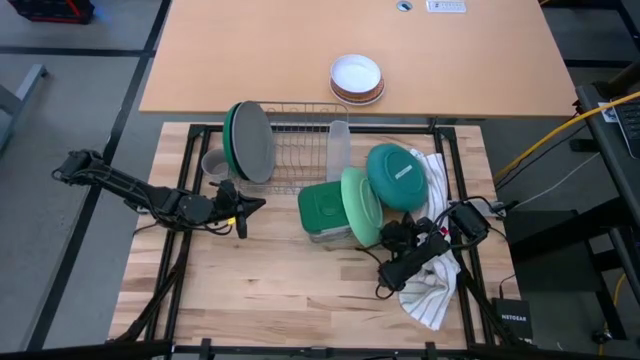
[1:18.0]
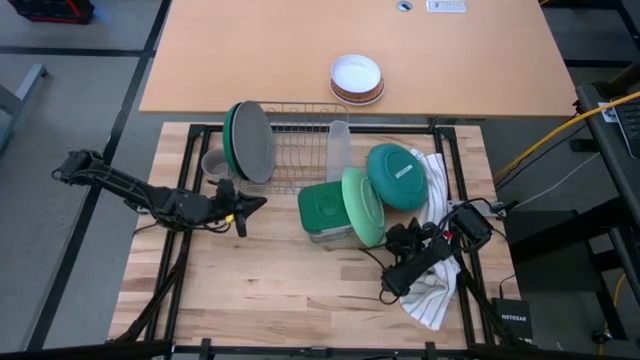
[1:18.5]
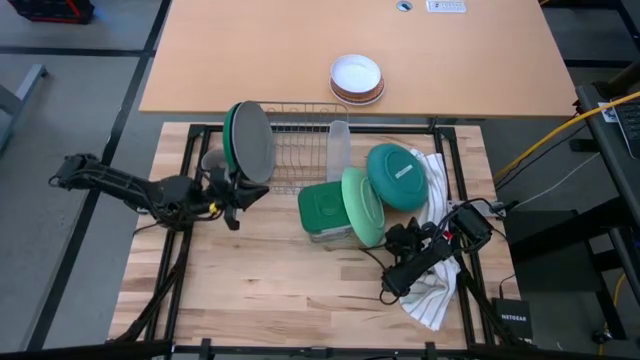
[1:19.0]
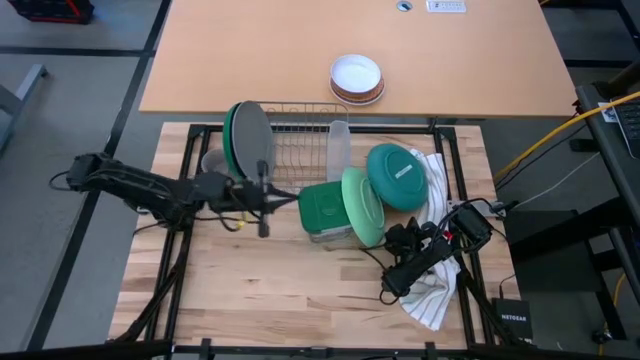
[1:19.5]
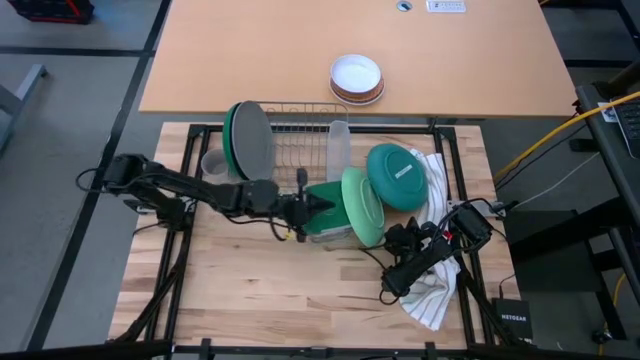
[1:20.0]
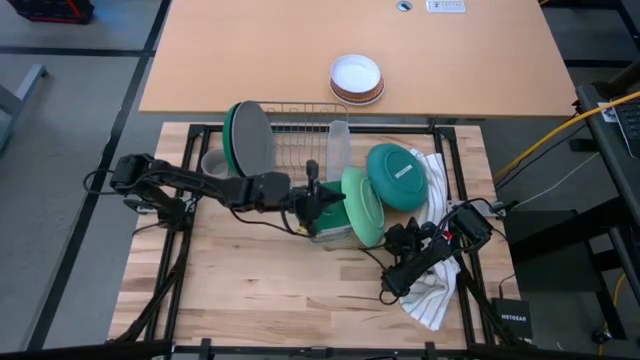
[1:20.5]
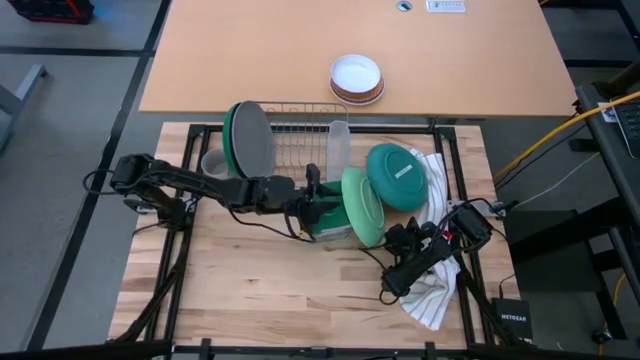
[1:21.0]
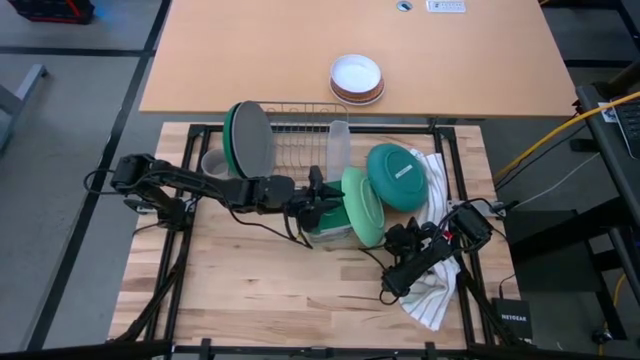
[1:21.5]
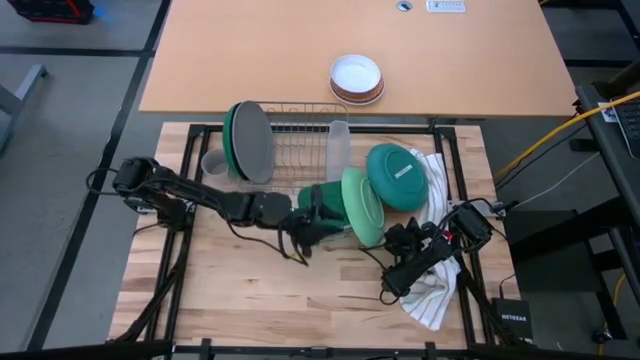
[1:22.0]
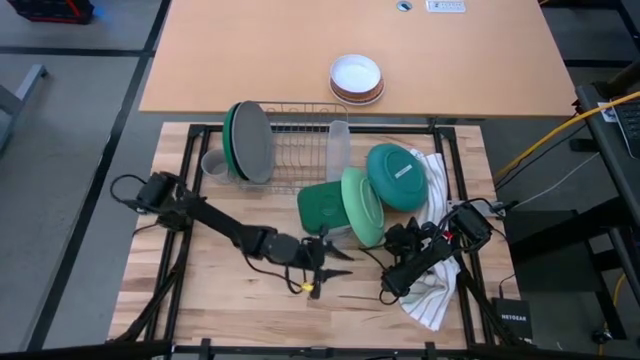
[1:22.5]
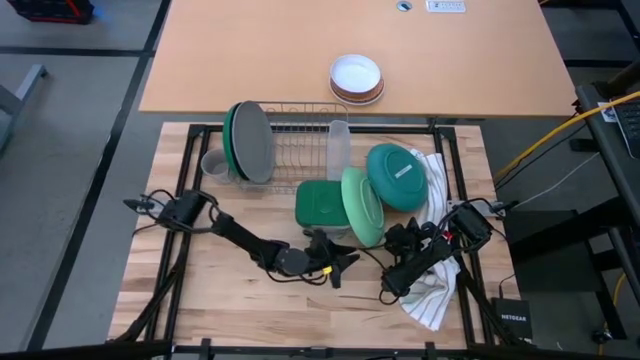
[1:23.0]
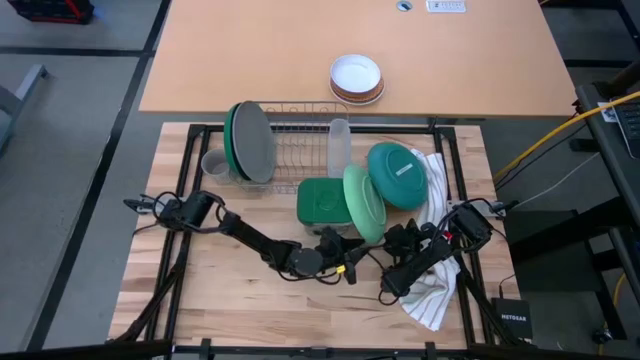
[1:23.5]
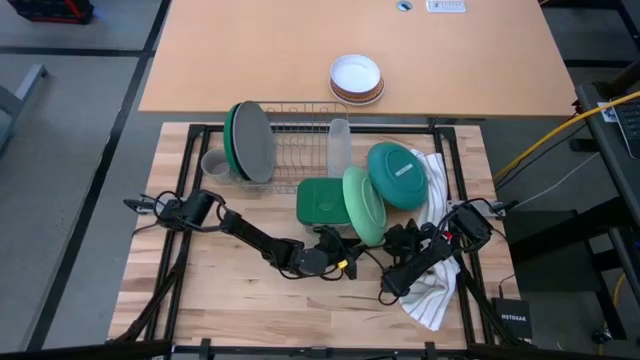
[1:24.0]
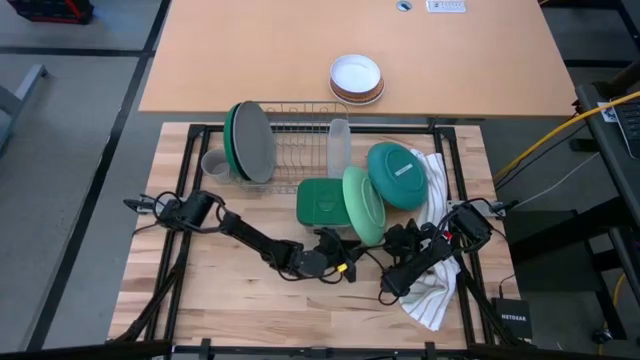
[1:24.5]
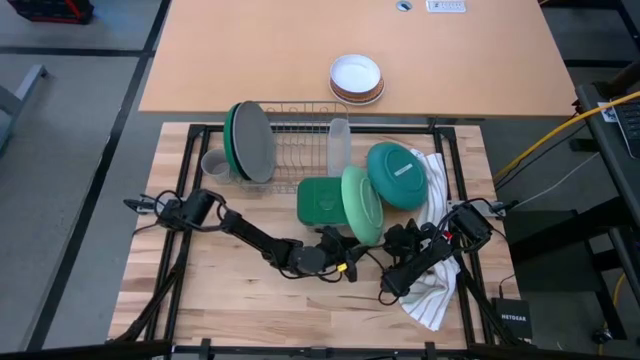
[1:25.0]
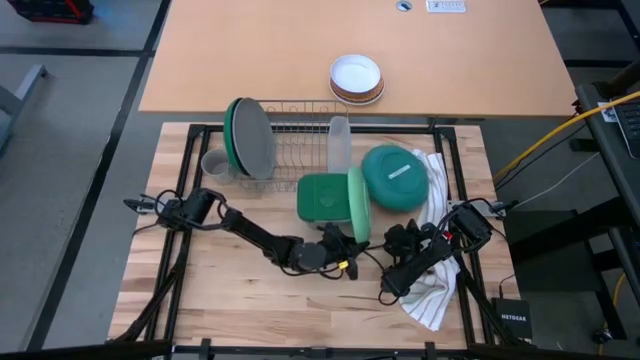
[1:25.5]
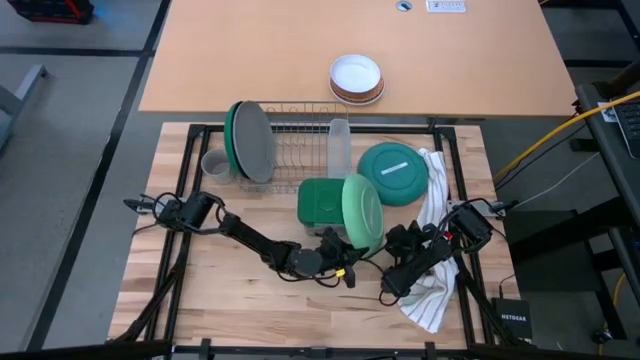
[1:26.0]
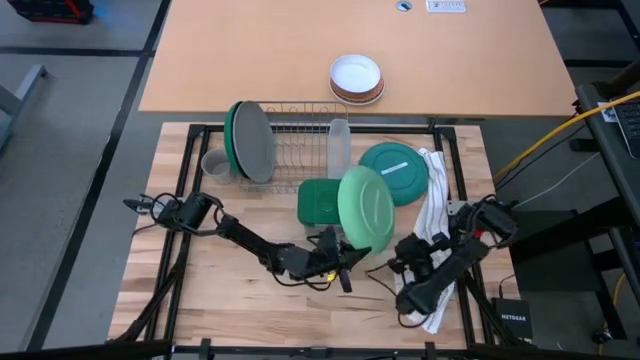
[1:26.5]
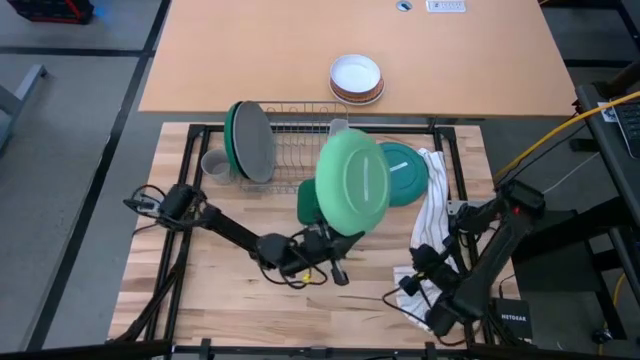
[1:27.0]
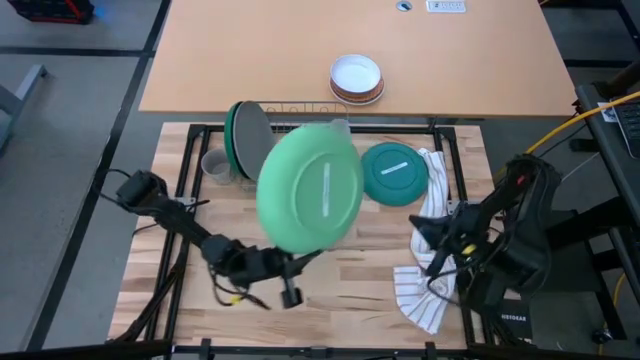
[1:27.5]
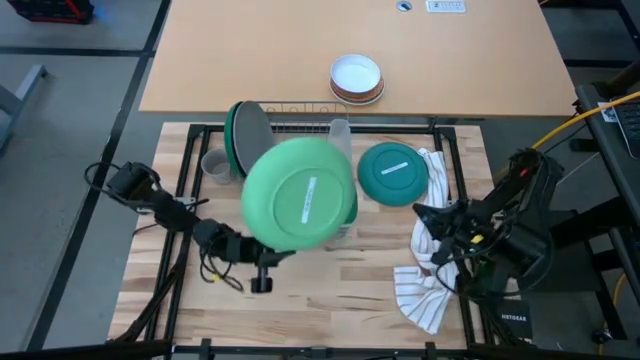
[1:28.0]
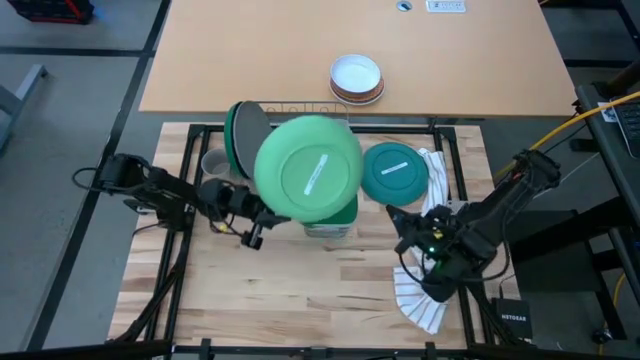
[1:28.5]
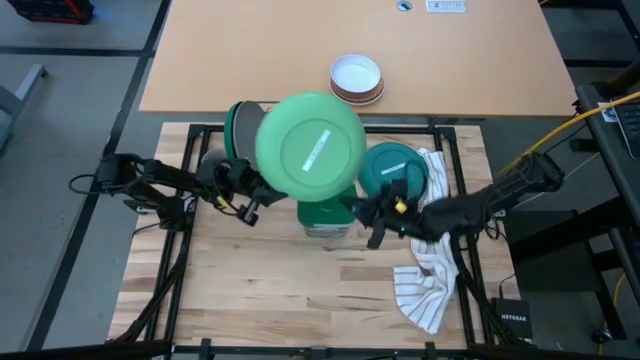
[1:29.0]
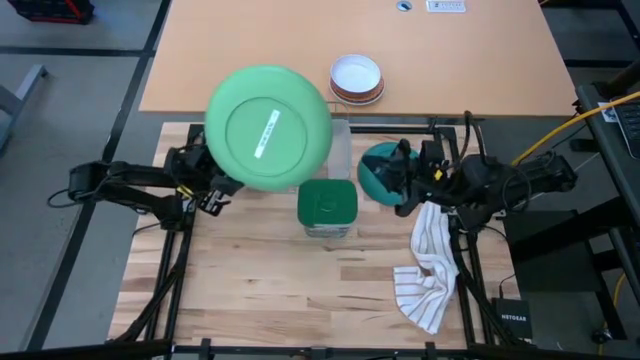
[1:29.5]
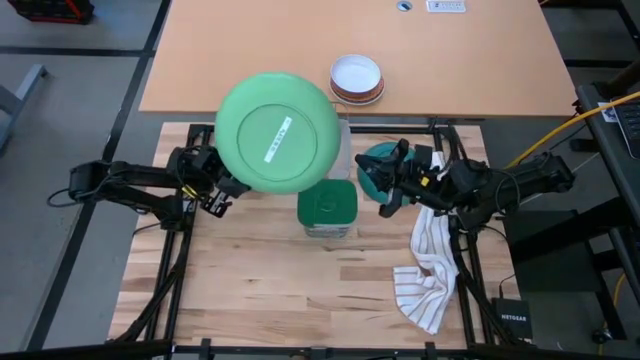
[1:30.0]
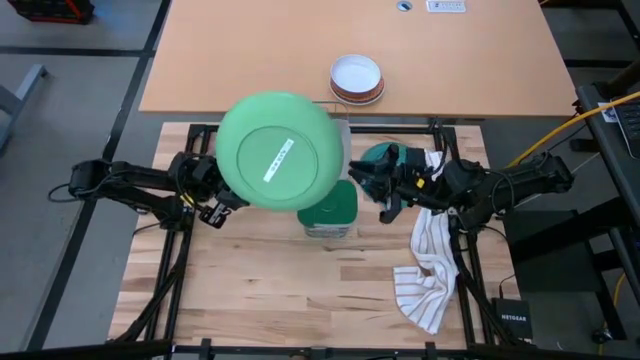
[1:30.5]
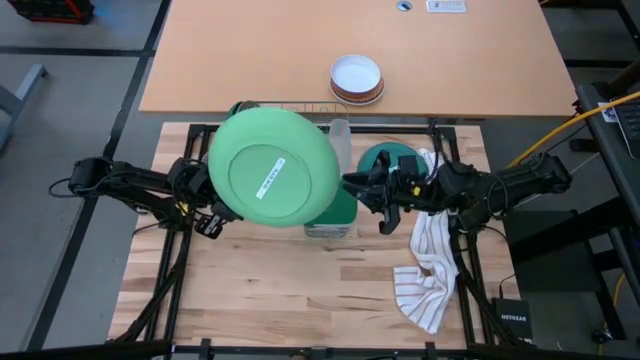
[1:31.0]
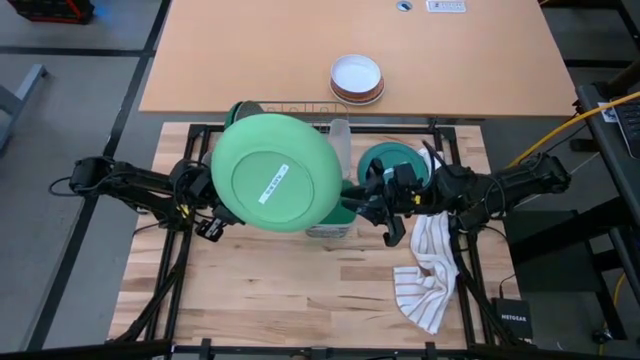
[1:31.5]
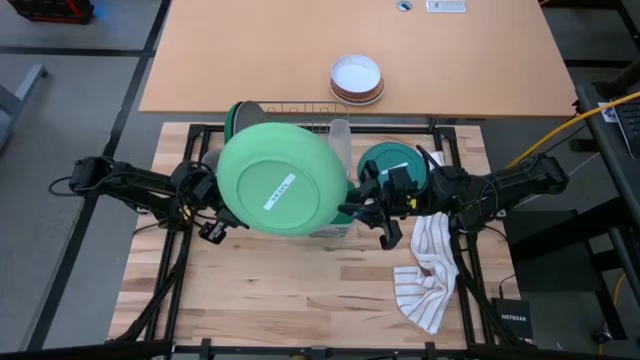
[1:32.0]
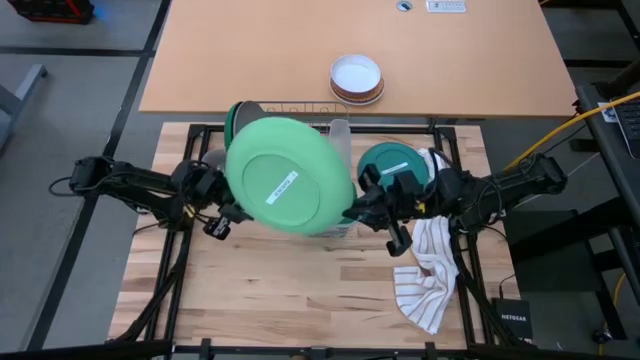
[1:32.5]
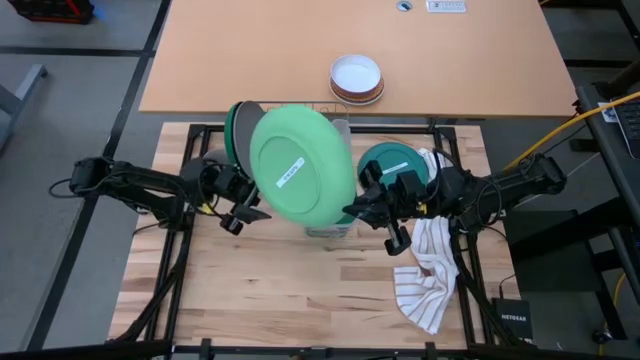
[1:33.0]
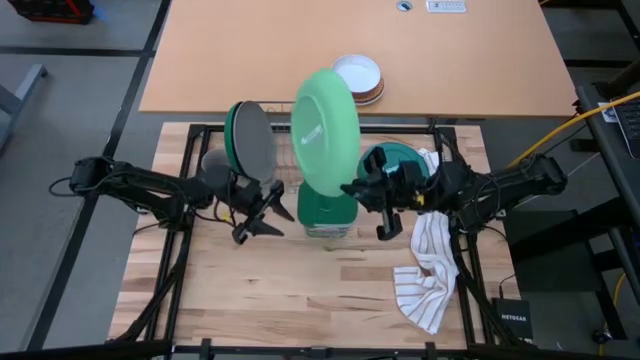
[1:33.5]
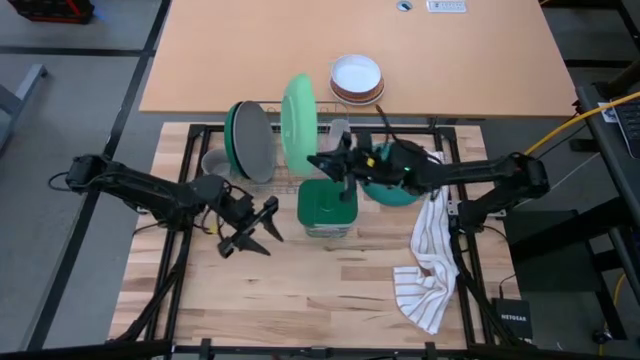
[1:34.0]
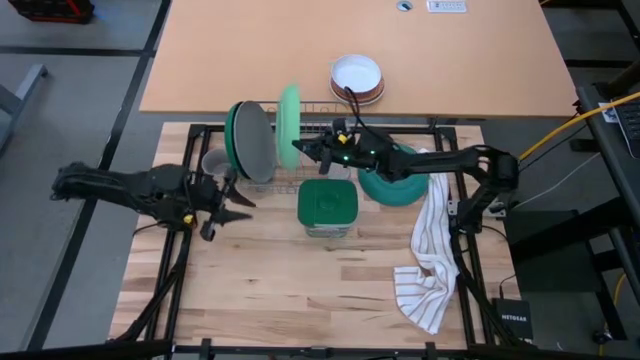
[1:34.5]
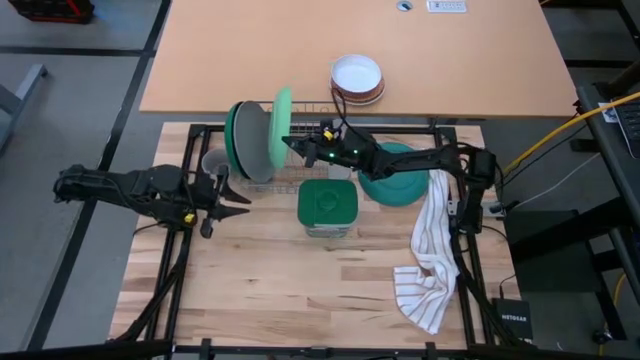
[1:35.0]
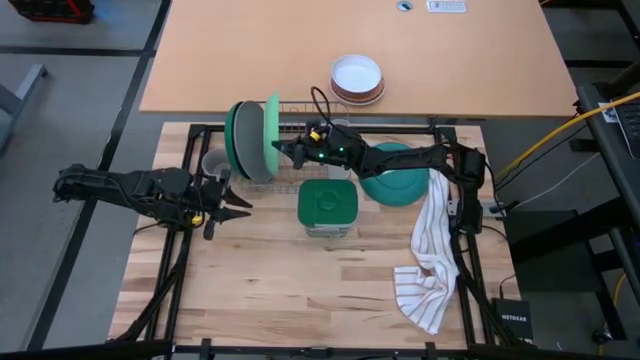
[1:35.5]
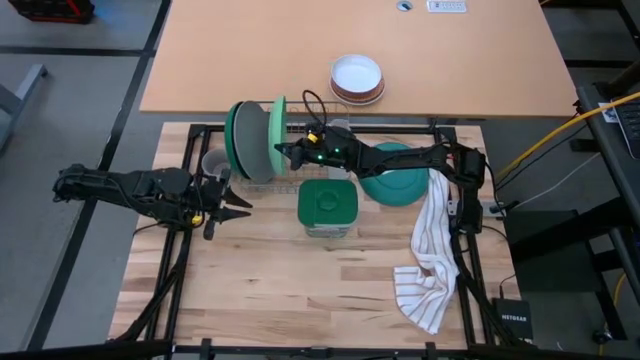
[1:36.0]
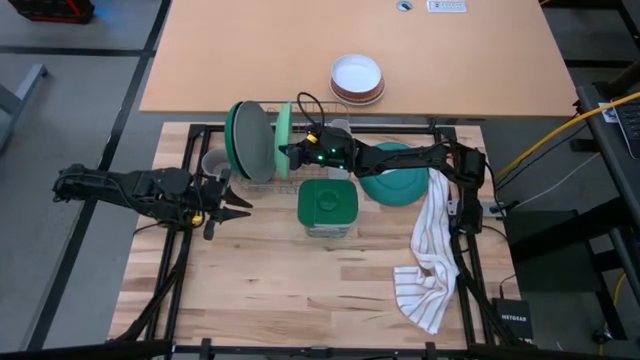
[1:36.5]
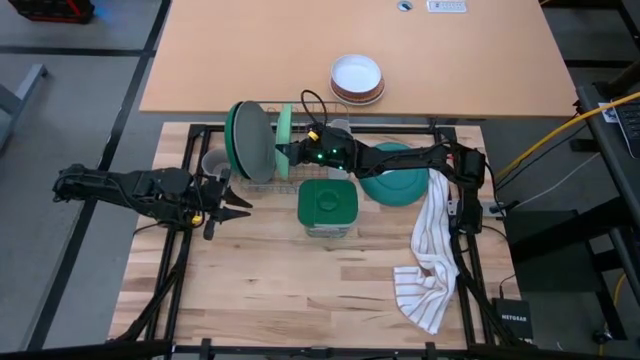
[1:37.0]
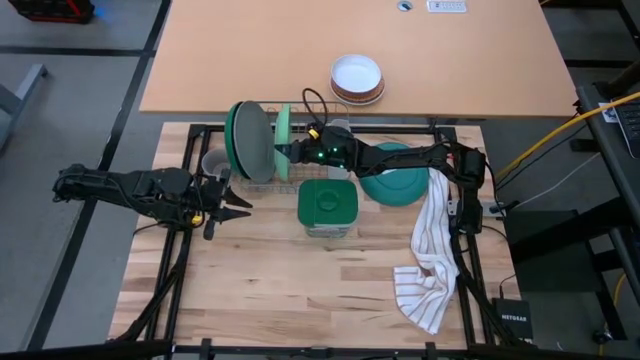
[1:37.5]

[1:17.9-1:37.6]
Task: Sort dishes
Put the light green plate into the dish rack

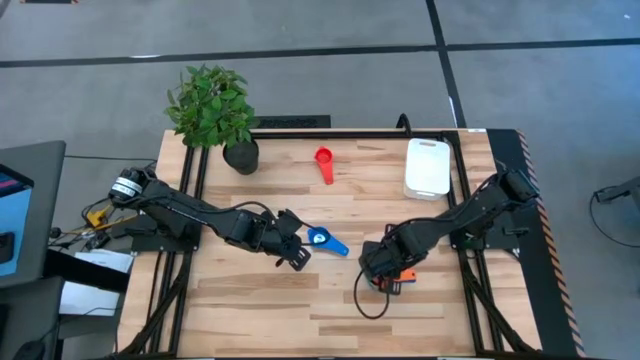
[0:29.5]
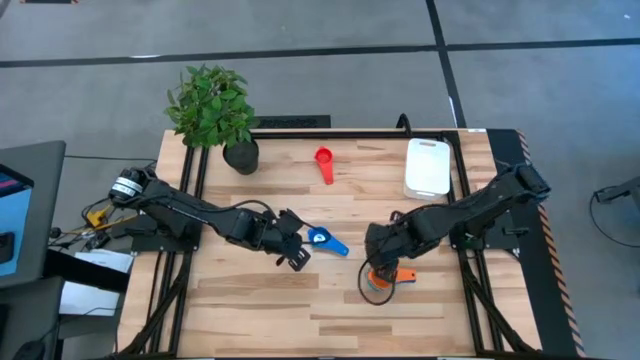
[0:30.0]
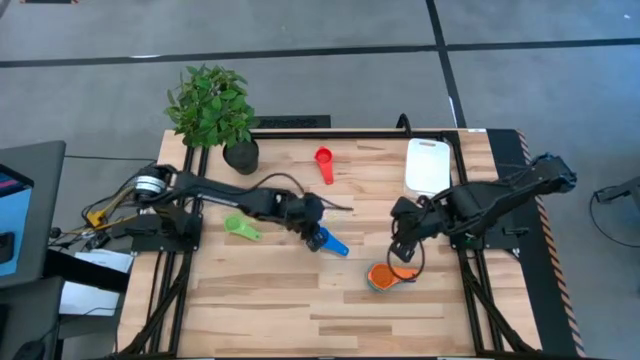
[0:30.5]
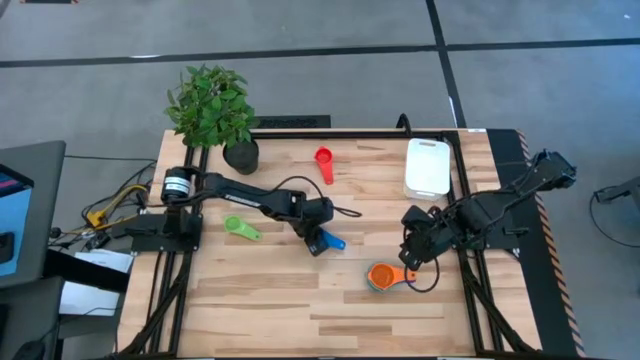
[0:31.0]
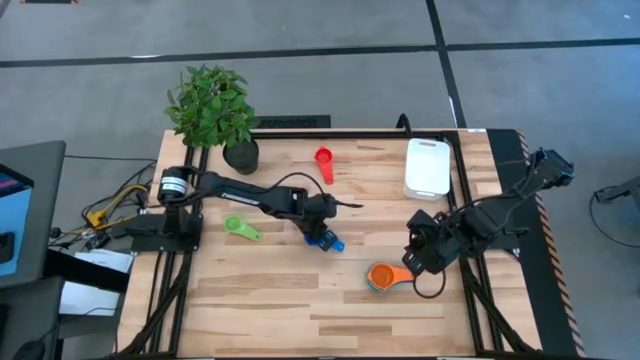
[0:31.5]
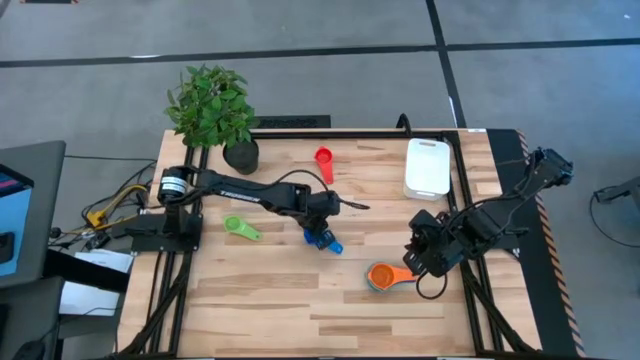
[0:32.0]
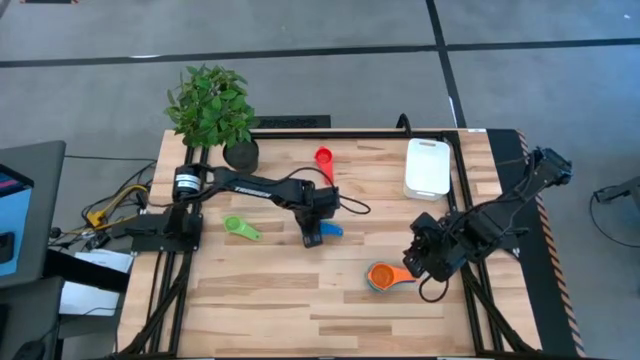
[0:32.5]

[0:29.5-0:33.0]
Task: Nest measuring cups in basket
Stack the blue measuring cup on the orange measuring cup
